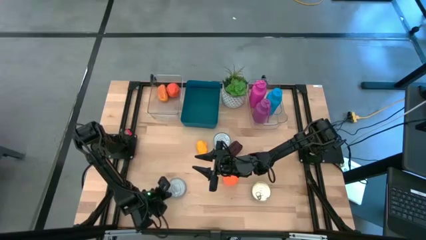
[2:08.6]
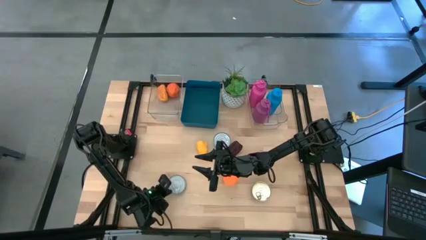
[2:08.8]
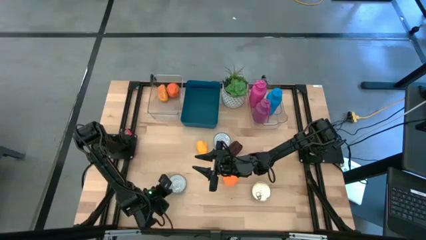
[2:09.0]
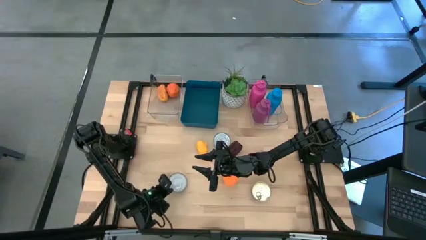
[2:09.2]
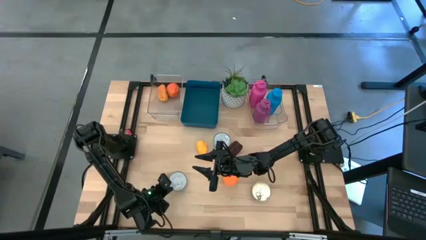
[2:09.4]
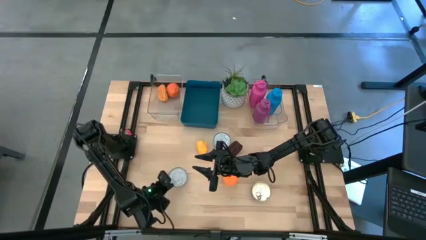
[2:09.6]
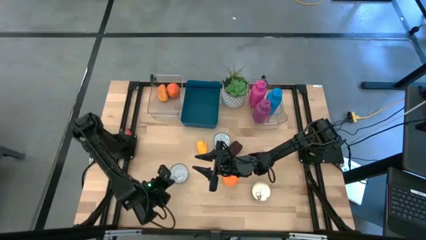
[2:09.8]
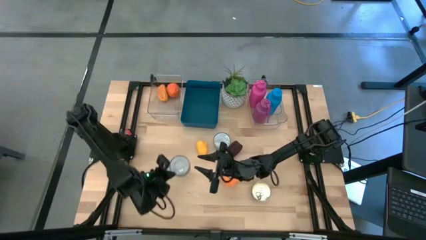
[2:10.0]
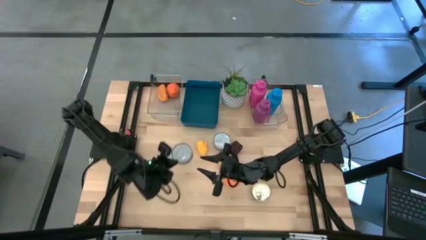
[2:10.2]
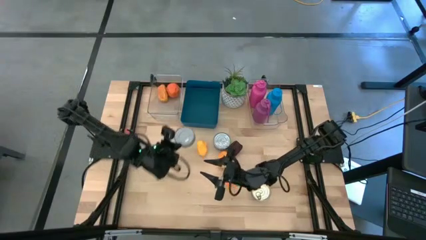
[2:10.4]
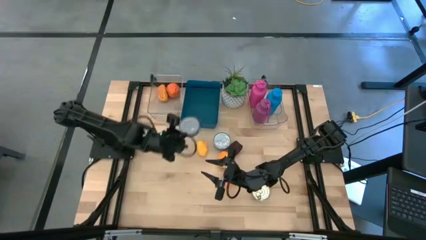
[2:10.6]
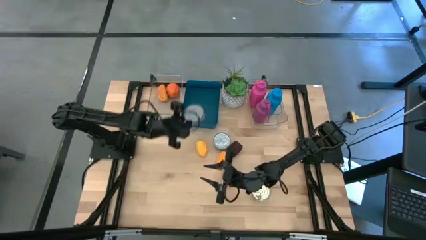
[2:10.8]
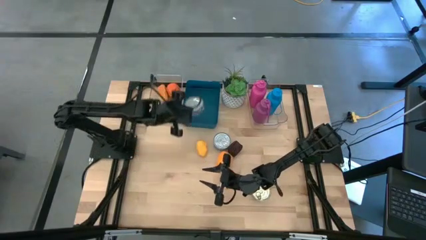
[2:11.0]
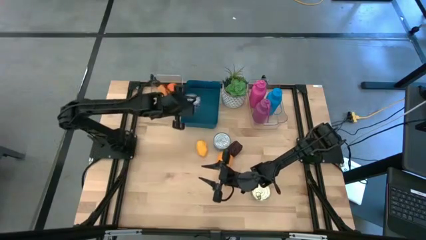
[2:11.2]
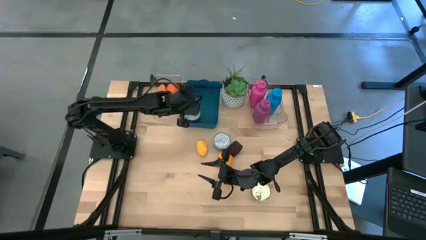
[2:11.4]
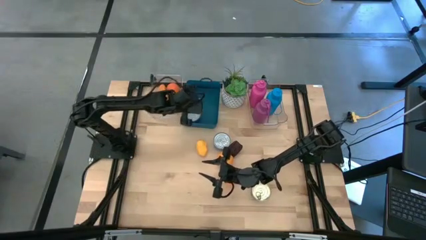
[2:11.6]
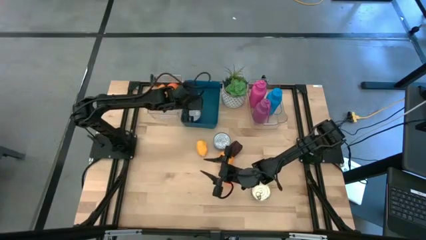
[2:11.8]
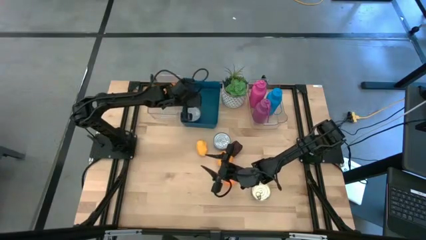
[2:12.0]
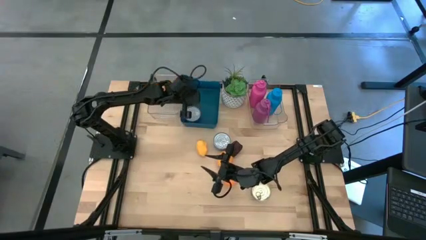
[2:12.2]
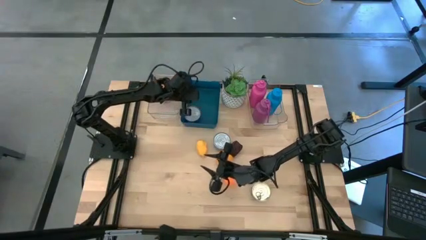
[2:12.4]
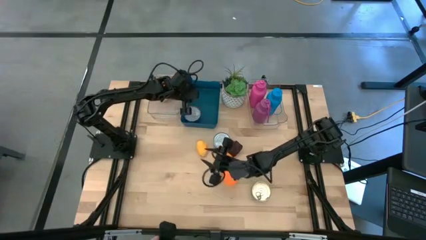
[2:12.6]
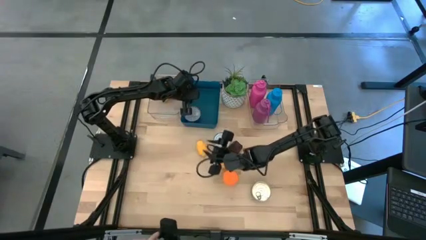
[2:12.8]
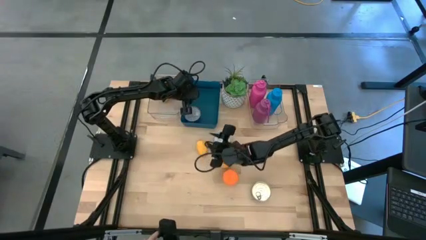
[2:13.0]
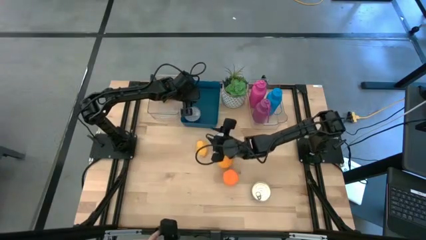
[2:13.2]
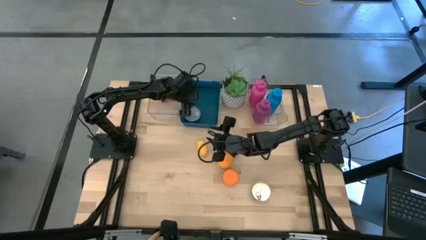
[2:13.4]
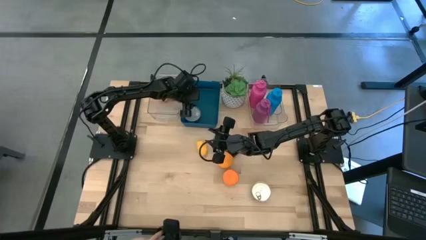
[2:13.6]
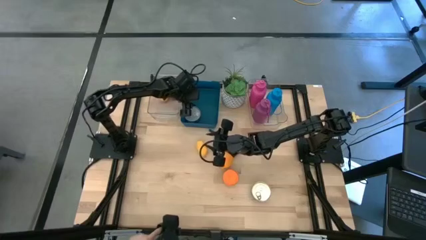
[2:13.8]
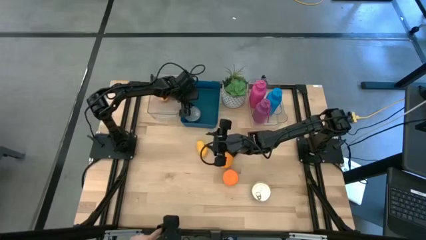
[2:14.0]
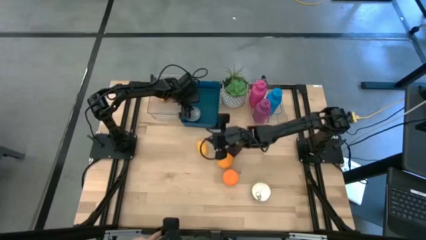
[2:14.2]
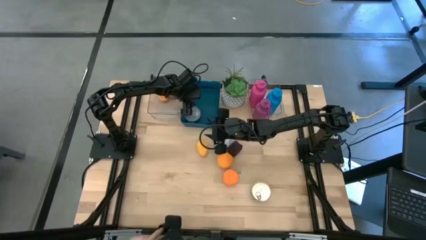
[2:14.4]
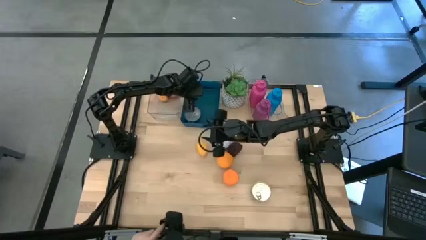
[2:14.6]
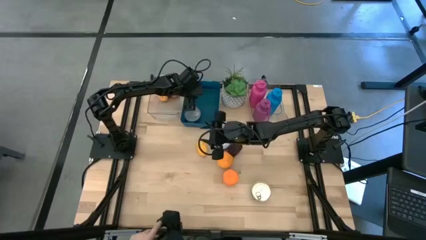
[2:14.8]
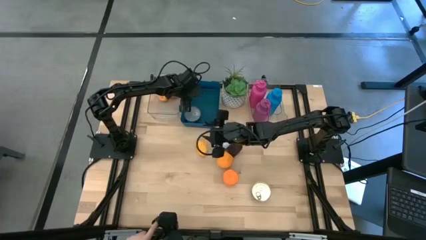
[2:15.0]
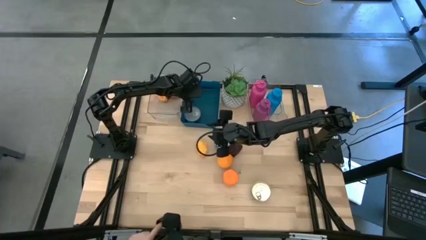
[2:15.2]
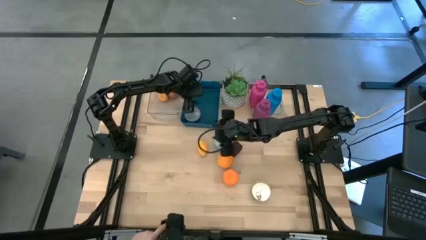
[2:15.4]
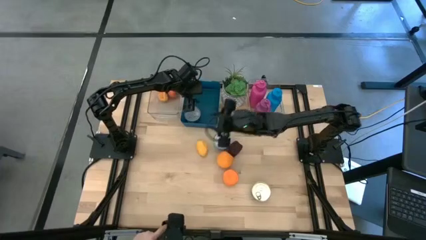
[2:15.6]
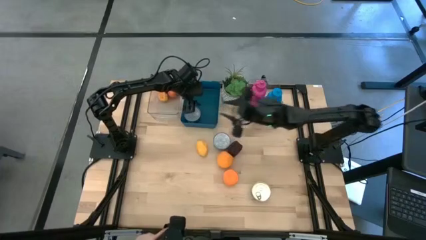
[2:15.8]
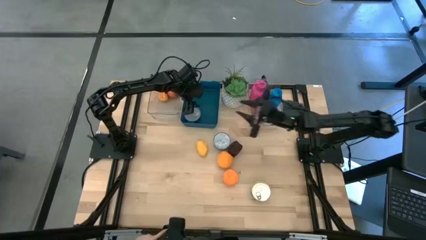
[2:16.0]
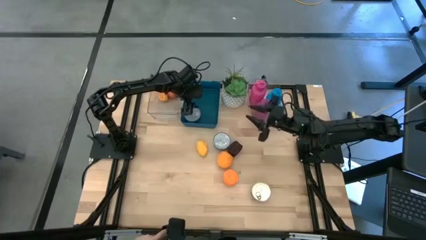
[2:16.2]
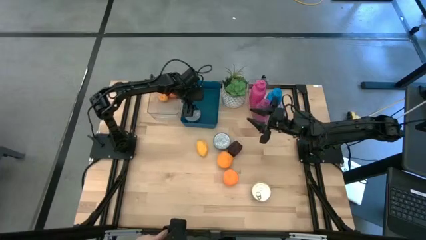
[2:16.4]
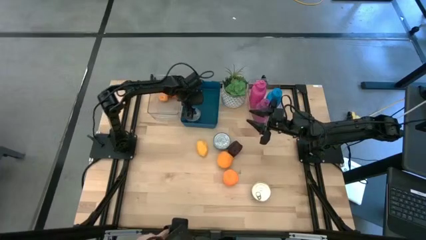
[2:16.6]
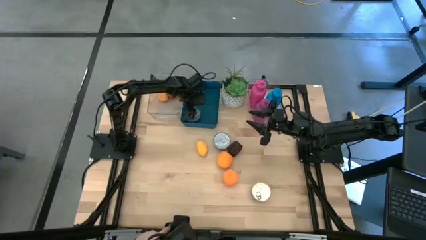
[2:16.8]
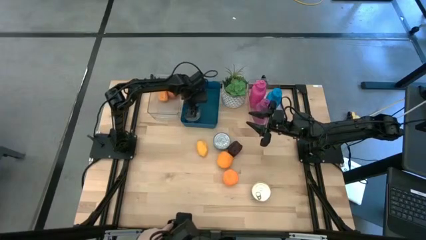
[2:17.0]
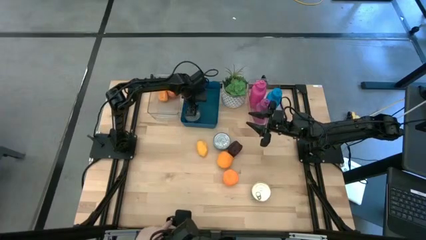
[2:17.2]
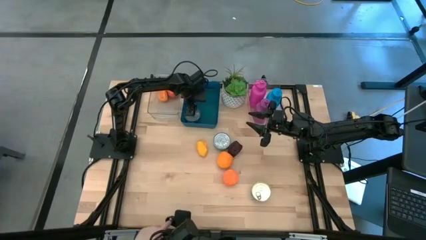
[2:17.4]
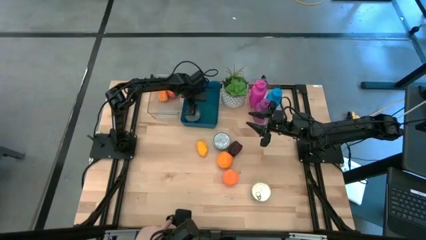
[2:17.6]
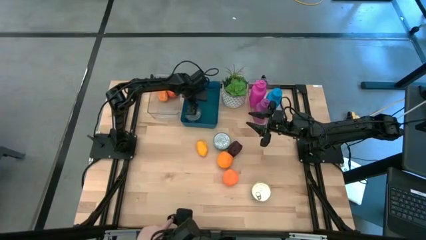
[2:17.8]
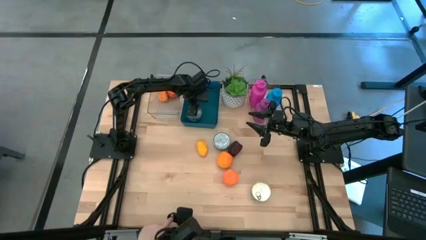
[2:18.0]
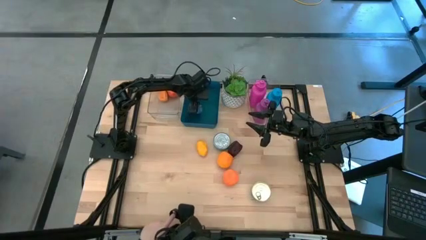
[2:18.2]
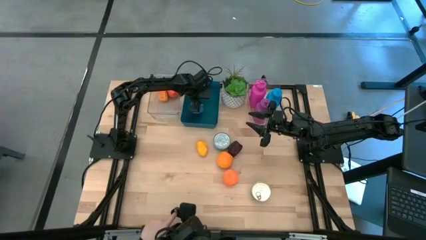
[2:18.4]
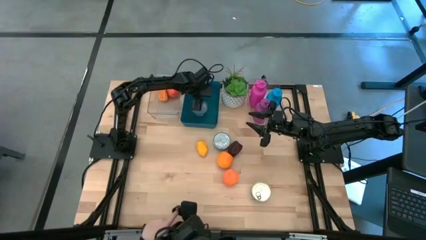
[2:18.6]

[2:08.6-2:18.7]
Task: Pick & Place Food Item
Put the blue tuna can into the blue bin

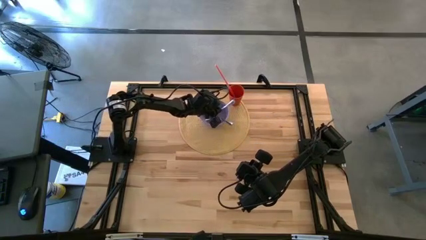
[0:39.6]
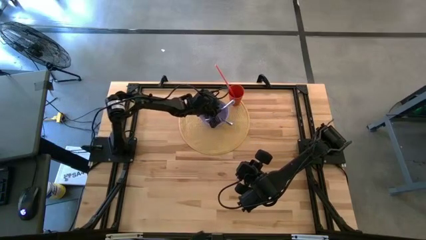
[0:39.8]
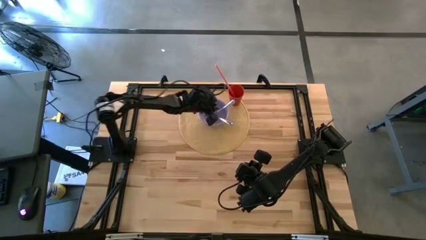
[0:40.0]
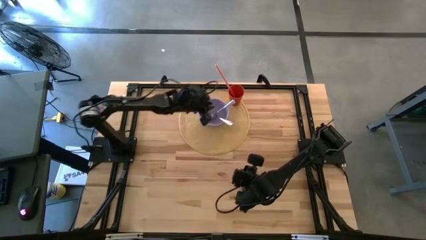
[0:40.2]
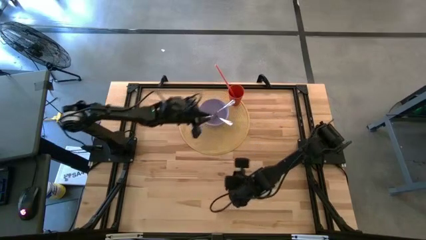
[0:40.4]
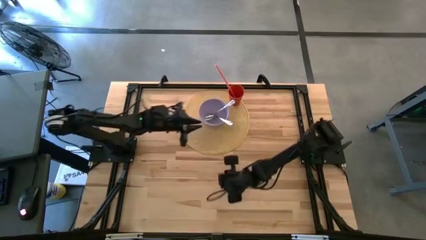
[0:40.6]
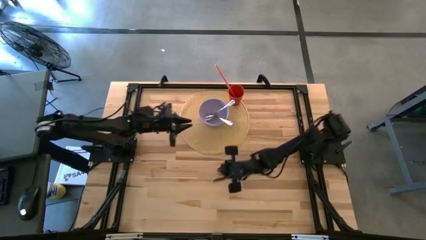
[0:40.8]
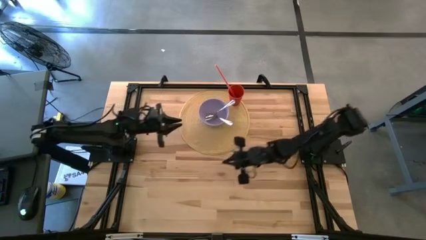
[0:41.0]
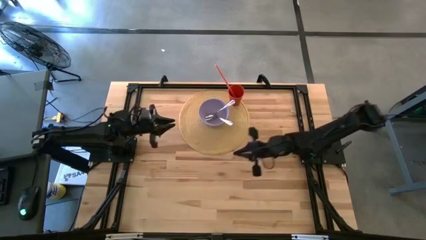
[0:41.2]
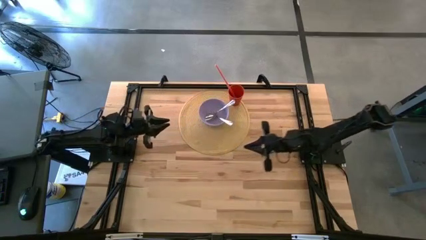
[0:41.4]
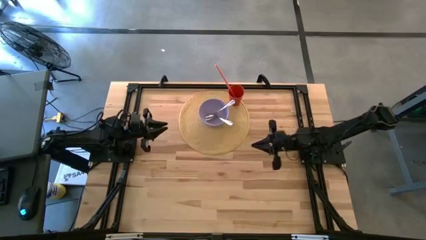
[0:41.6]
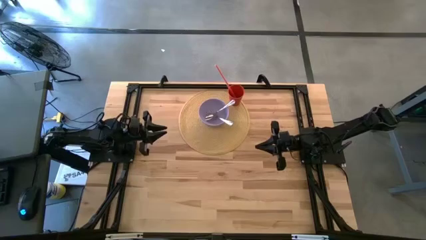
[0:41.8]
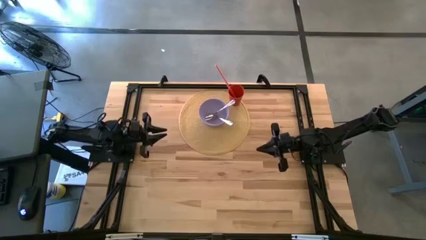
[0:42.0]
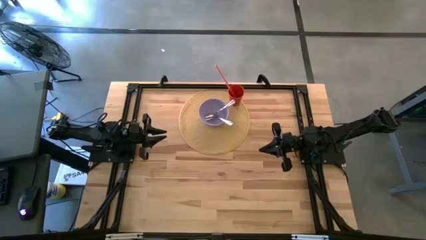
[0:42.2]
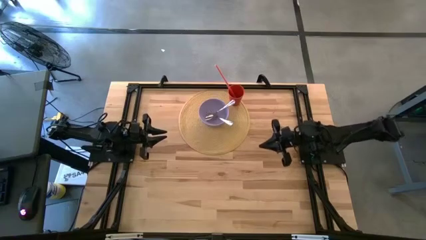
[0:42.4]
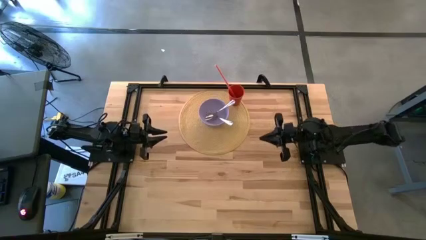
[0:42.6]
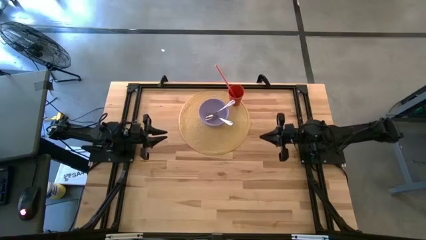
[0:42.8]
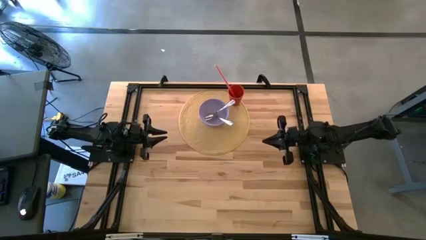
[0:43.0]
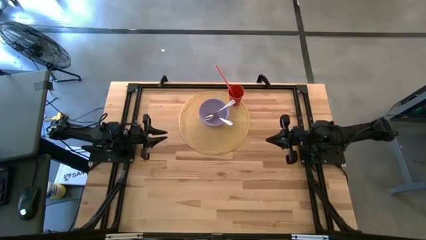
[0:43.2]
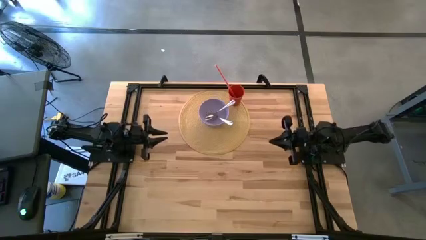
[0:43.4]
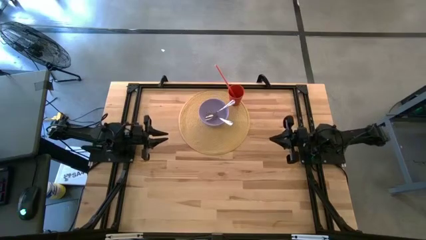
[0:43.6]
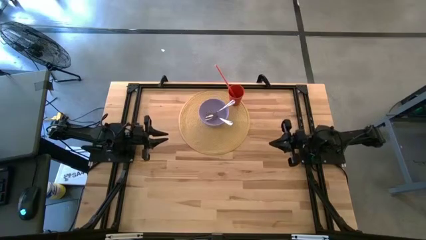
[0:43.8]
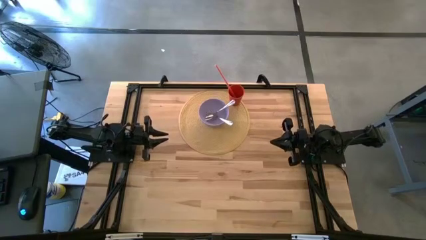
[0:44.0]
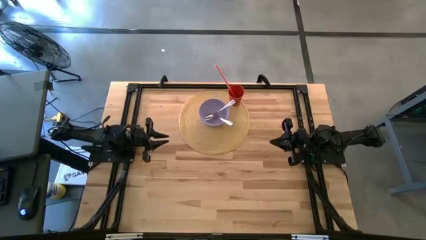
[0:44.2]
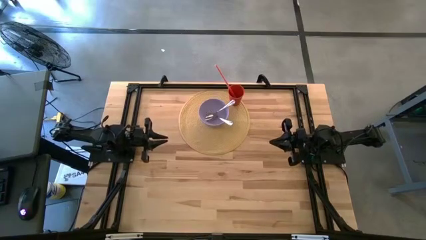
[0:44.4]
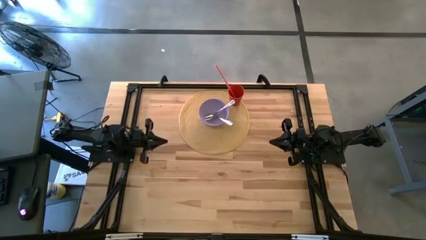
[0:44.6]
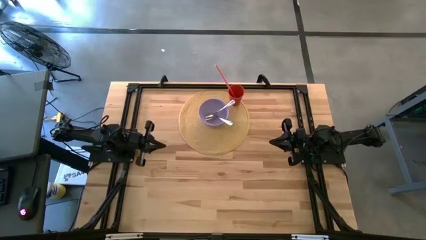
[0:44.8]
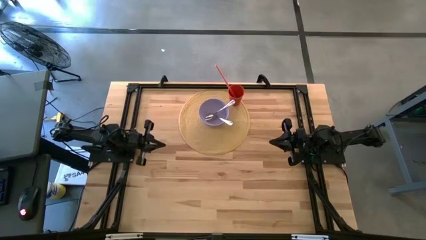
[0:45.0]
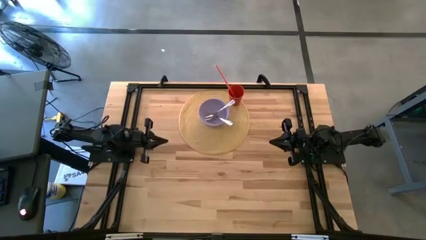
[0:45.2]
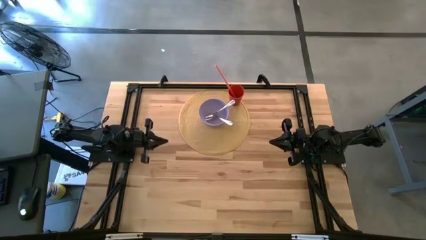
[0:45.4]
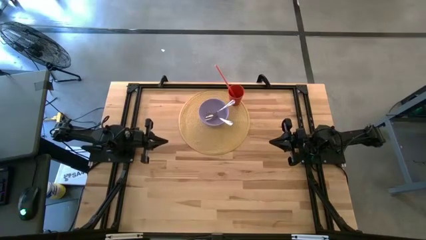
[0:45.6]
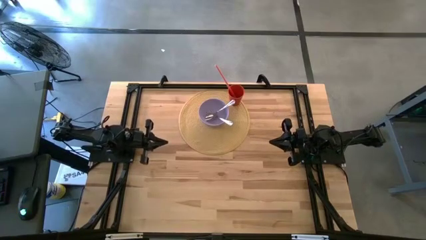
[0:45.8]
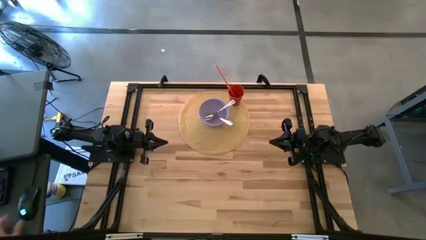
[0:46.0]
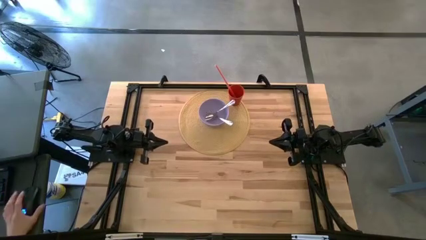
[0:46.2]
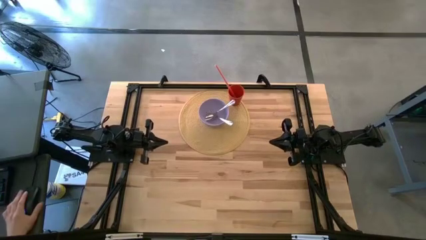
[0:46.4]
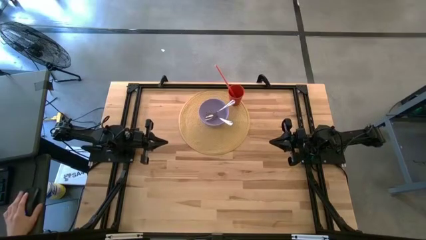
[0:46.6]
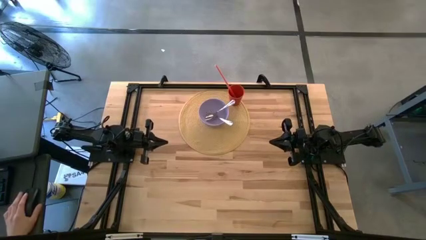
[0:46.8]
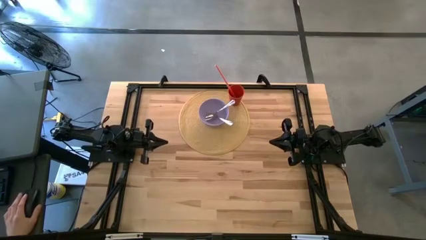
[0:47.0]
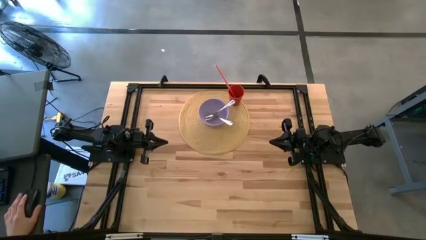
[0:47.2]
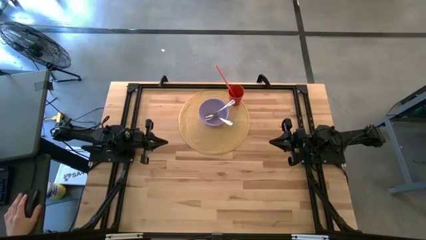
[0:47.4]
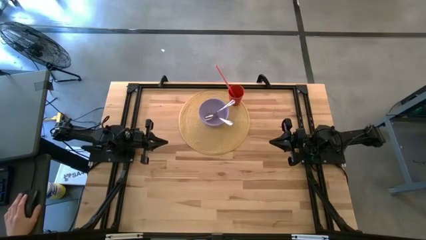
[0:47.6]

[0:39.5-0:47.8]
Task: Pick & Place Utensil
Return to Home Position
